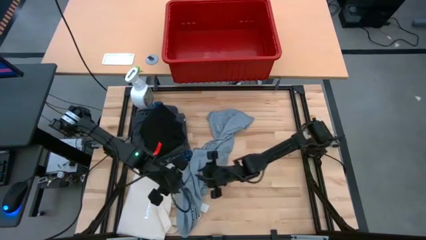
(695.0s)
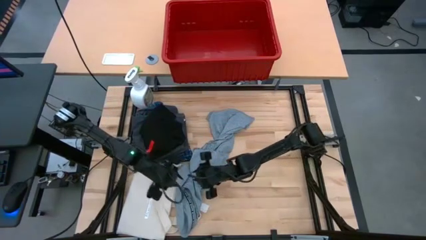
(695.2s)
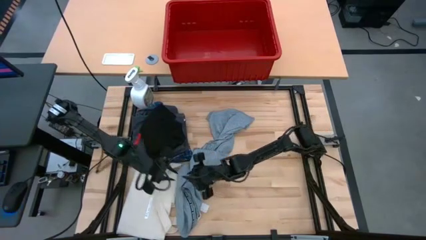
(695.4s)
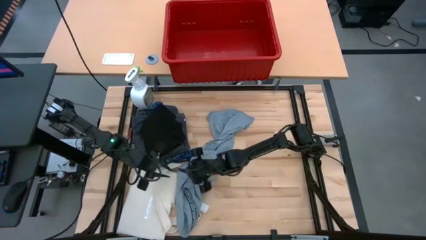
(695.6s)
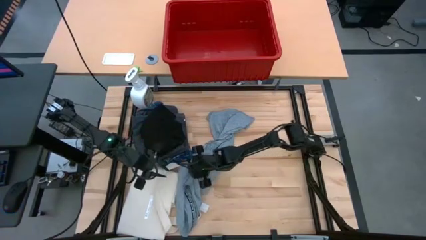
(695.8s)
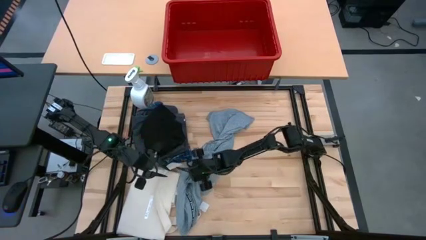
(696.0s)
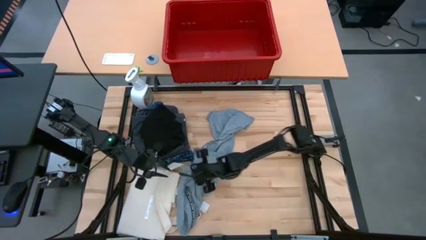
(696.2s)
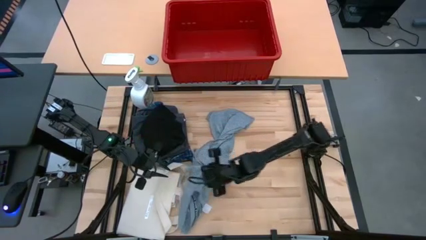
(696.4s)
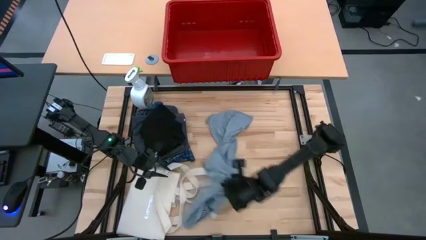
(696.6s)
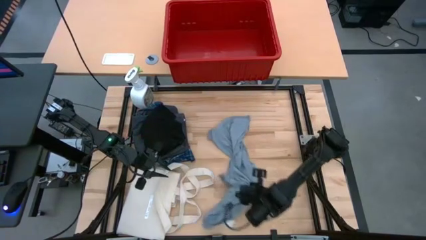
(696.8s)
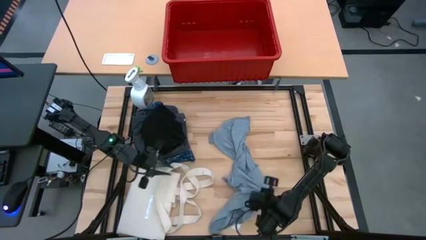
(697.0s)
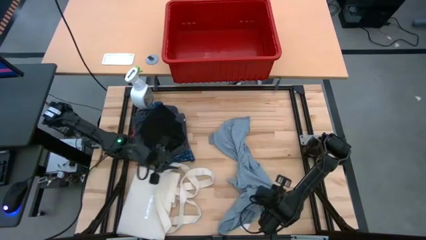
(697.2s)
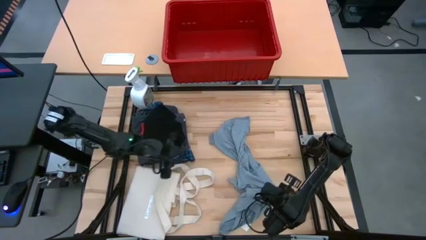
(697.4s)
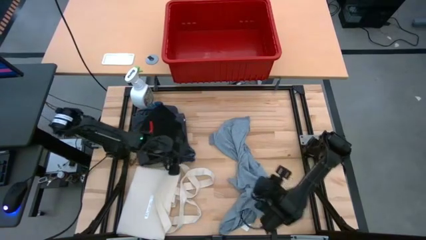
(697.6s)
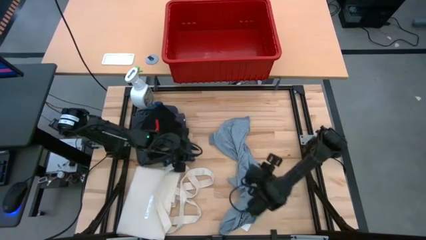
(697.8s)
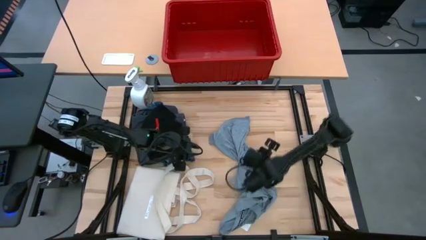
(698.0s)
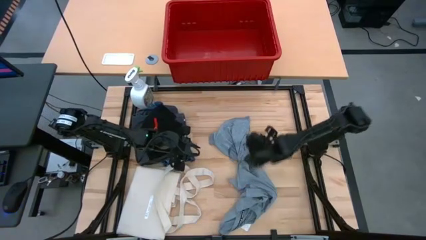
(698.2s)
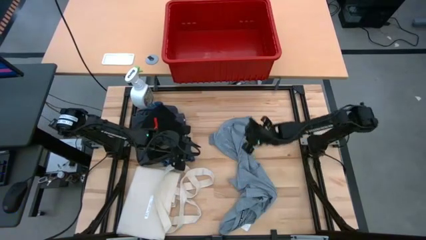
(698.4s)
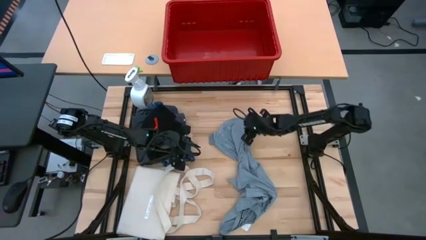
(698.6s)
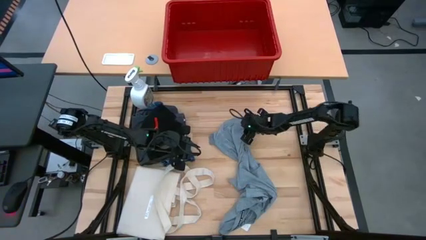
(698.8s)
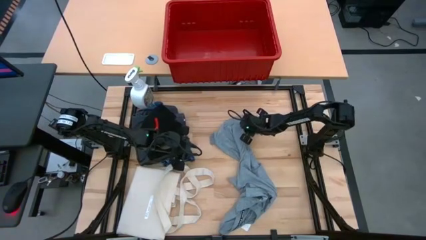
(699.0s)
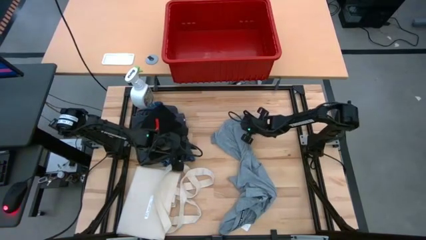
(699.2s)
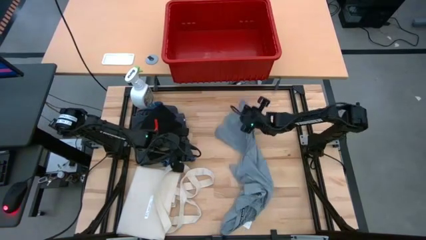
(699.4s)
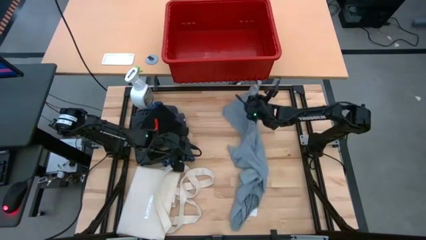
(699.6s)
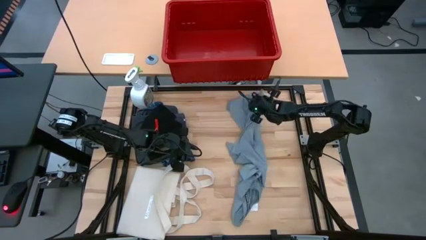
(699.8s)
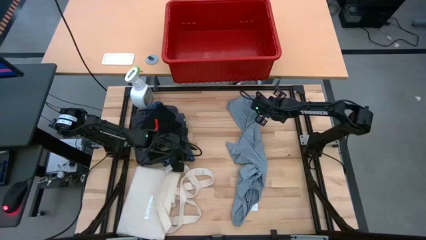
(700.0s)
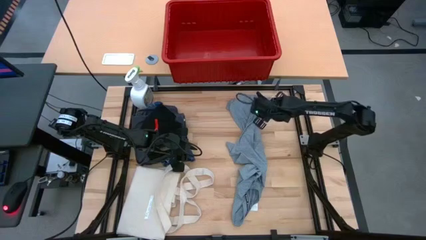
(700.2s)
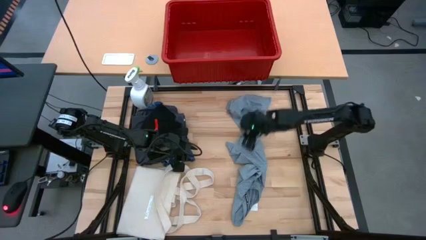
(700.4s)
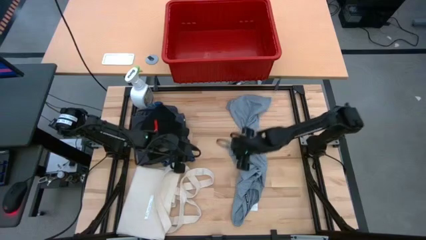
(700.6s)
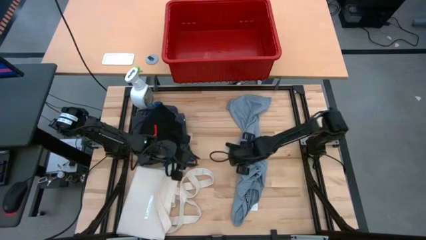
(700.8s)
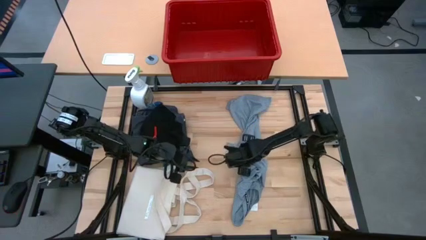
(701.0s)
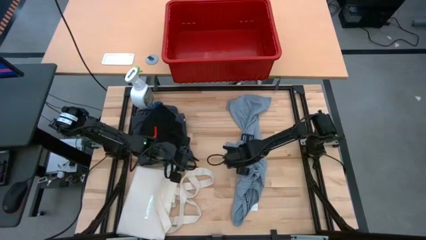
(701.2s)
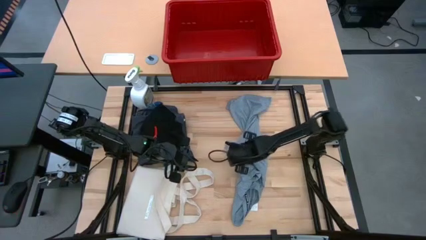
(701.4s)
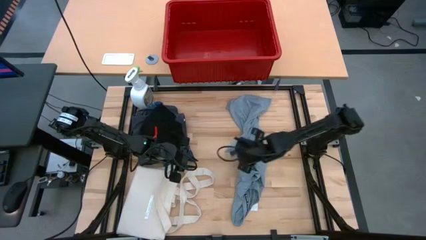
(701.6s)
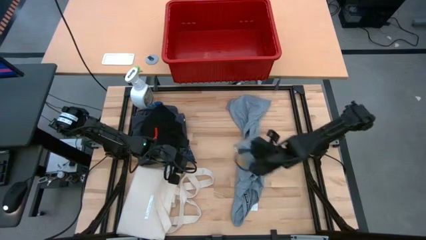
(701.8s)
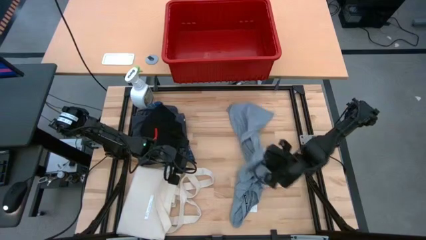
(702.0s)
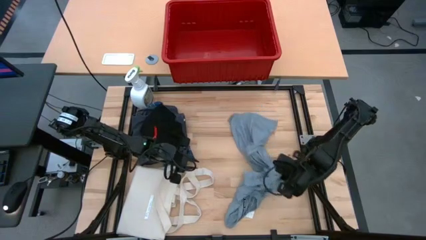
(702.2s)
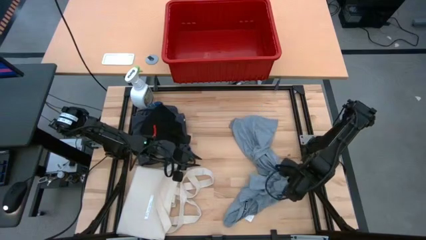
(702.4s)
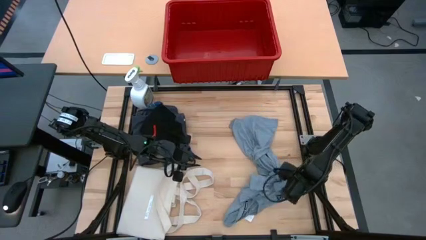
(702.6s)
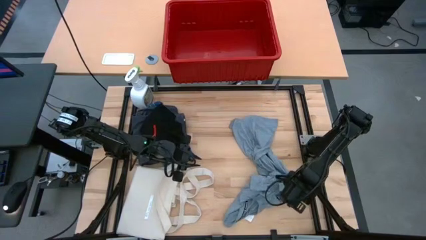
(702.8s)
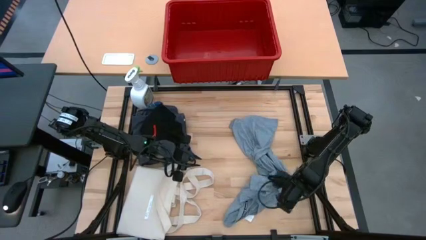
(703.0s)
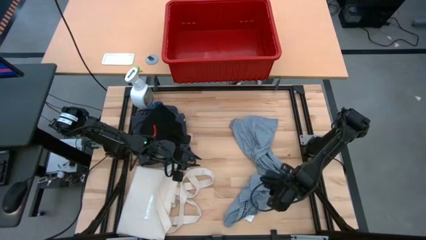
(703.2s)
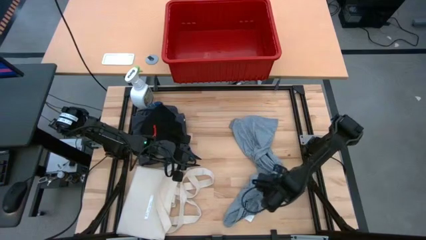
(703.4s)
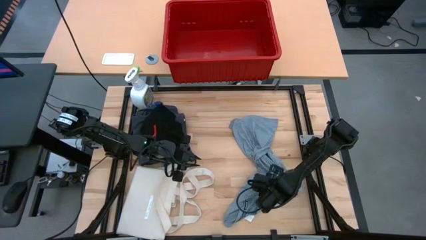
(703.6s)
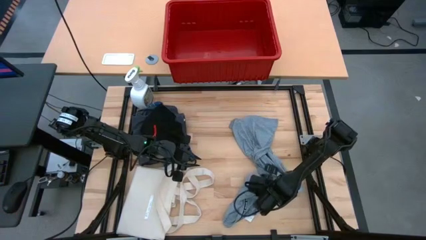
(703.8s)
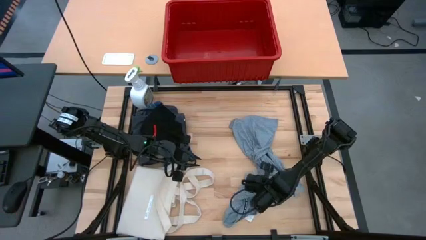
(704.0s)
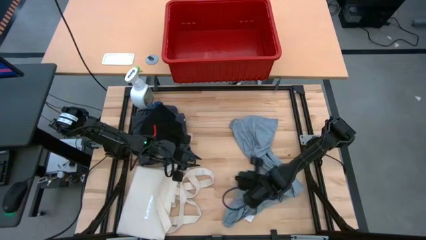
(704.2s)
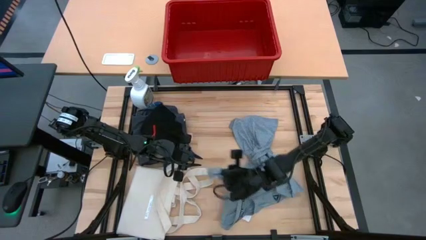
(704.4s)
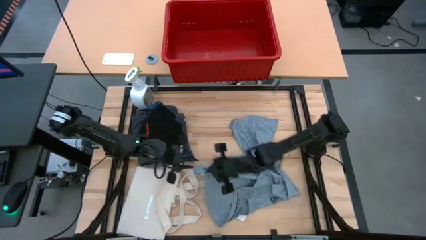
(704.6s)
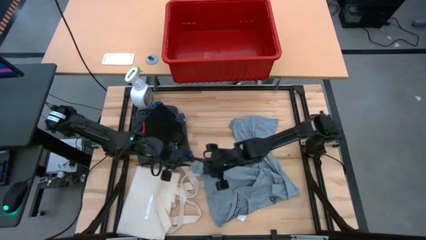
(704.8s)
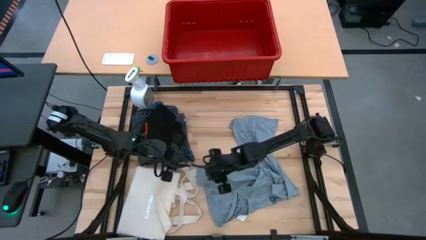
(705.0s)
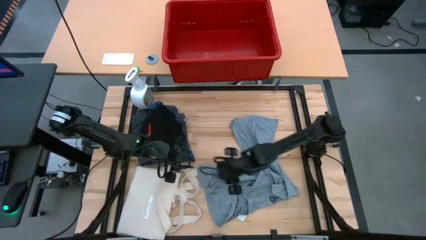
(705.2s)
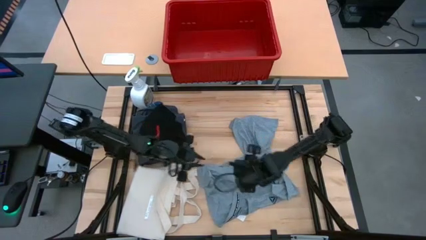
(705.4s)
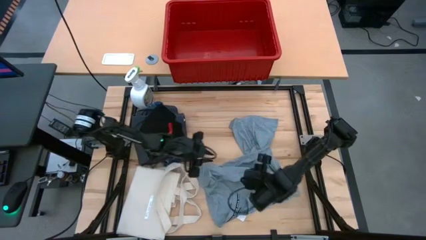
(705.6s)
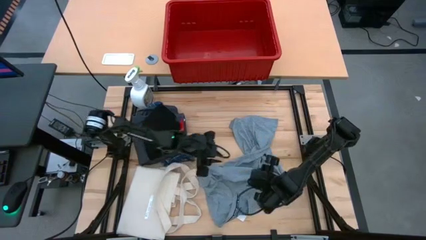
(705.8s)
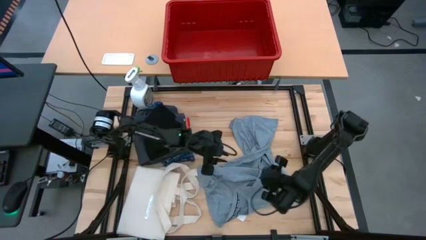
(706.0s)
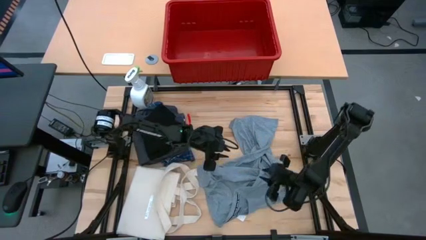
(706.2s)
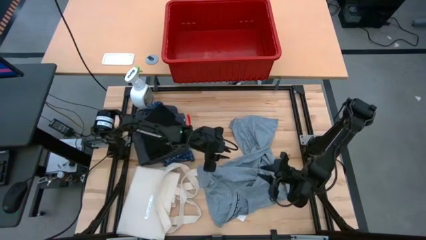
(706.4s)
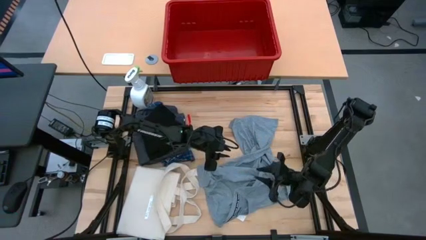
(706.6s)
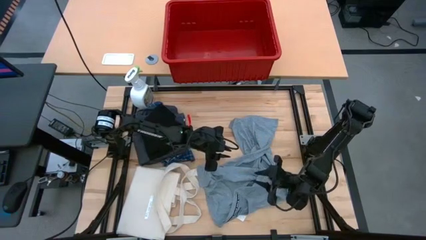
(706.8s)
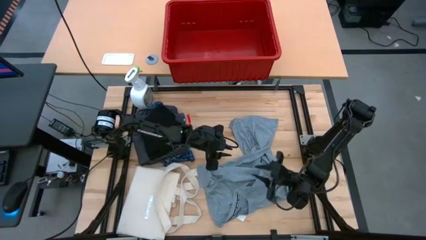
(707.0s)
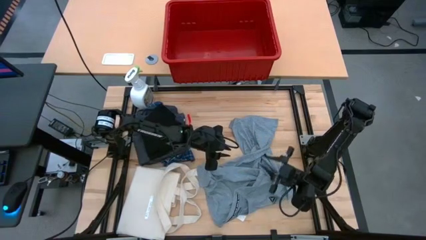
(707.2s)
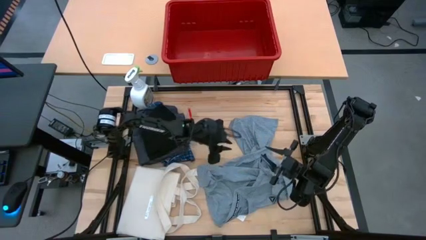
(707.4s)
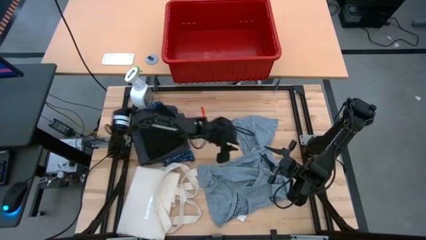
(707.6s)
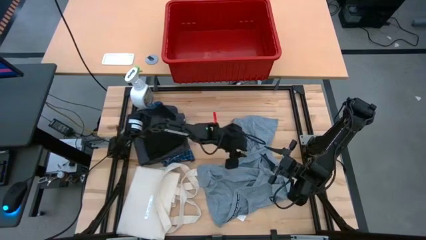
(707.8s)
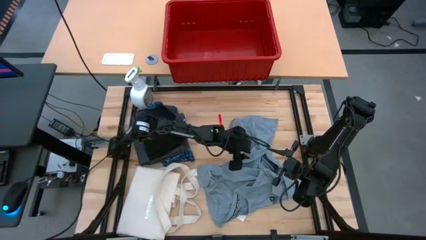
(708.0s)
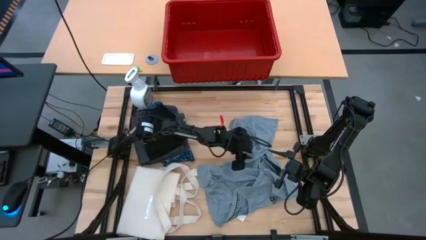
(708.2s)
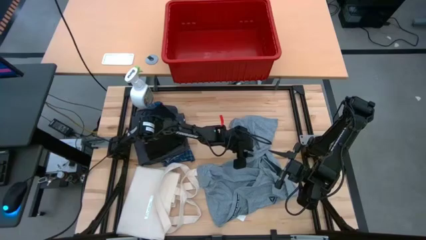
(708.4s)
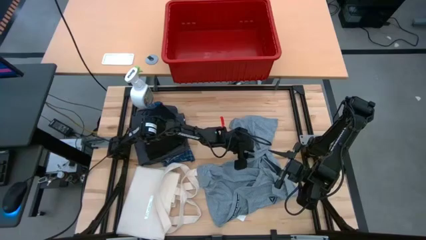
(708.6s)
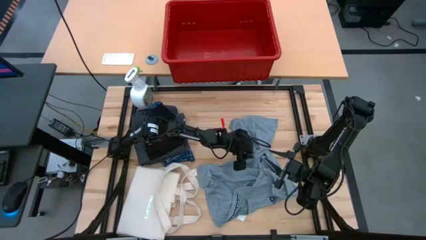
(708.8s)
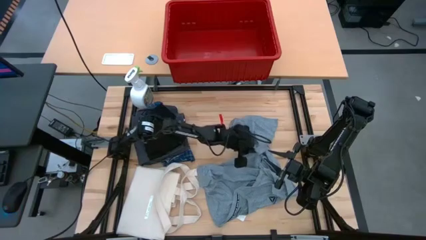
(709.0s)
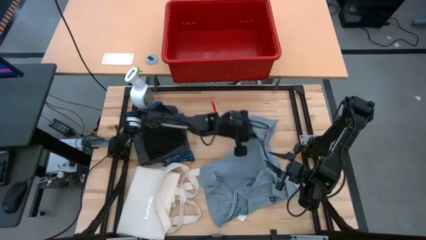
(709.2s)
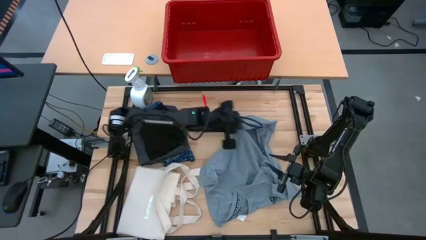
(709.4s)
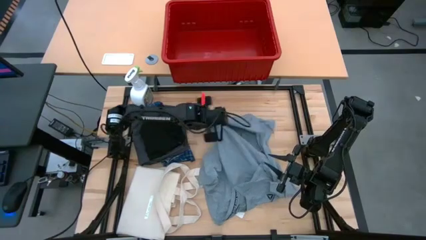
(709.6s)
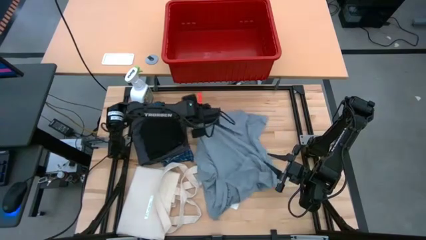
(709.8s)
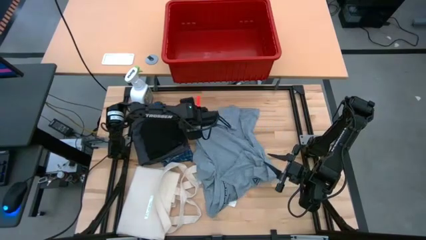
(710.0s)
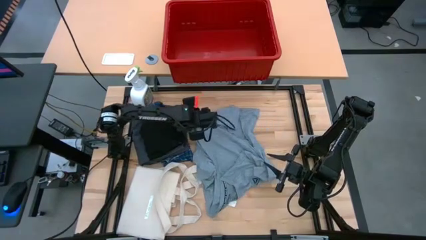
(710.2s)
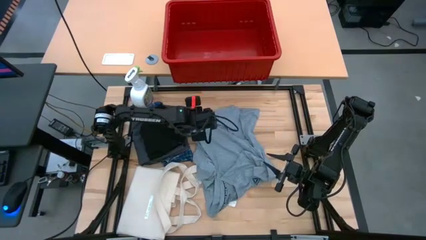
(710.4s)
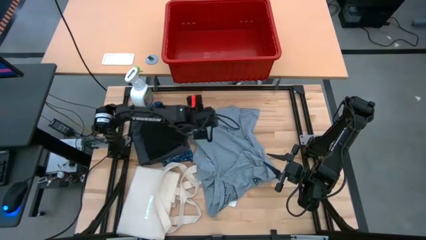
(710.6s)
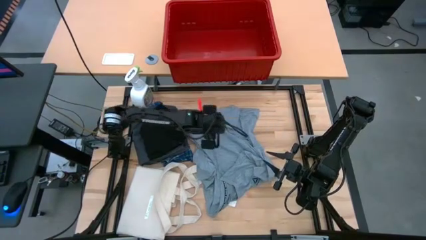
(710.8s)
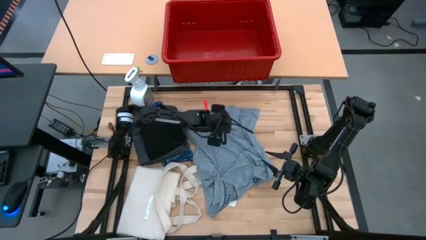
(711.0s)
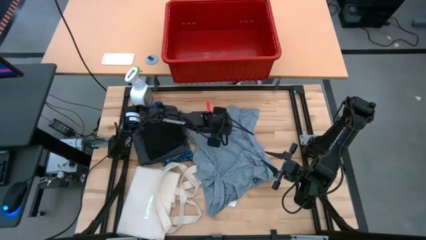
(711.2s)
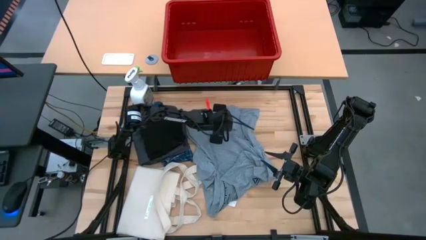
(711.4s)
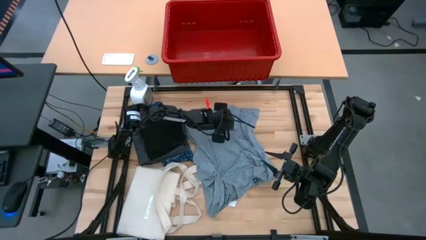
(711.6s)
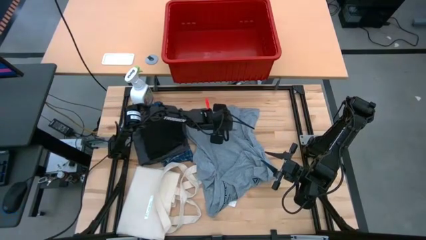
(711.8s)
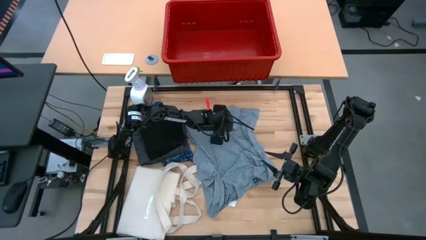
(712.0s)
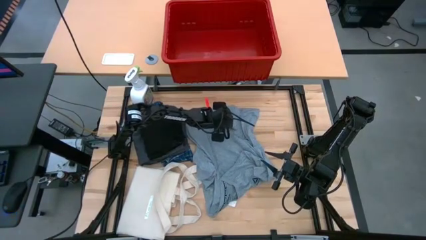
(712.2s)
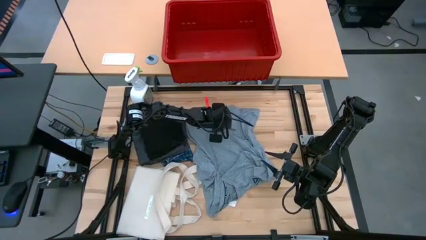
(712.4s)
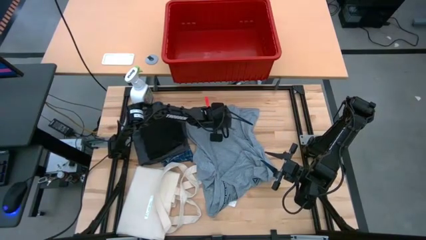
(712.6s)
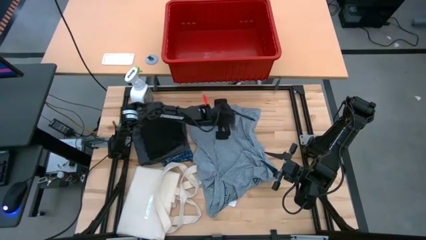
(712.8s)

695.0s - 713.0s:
Task: Fold Laundry from Bin
Fold the gray shirt
